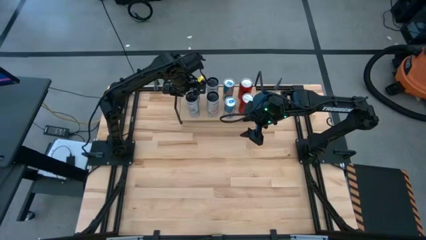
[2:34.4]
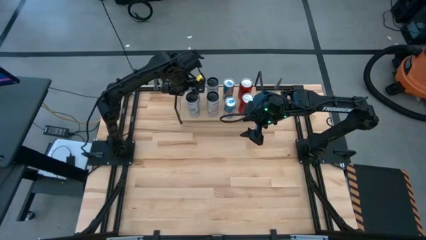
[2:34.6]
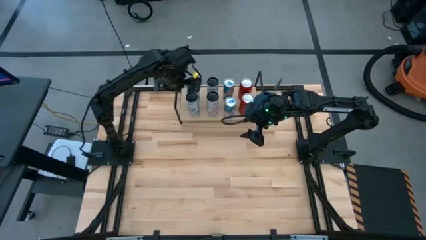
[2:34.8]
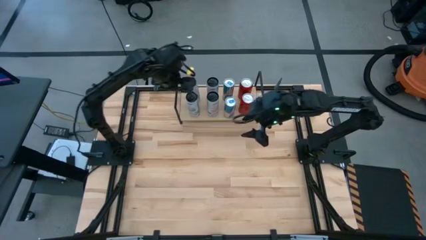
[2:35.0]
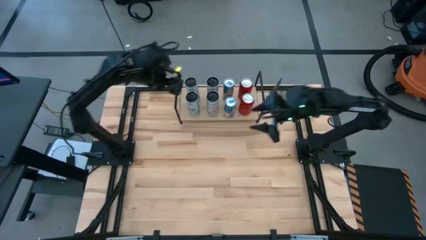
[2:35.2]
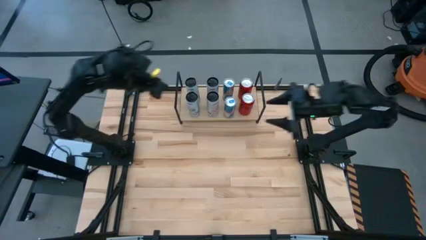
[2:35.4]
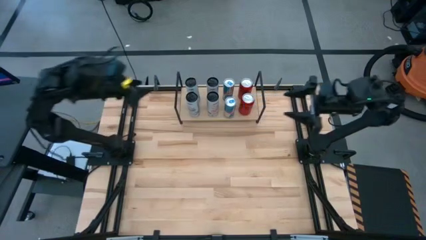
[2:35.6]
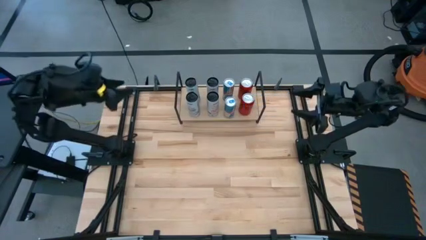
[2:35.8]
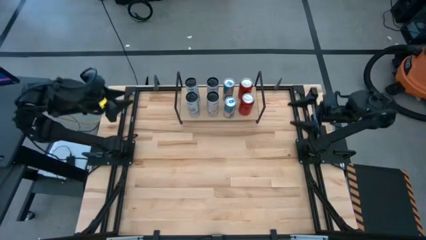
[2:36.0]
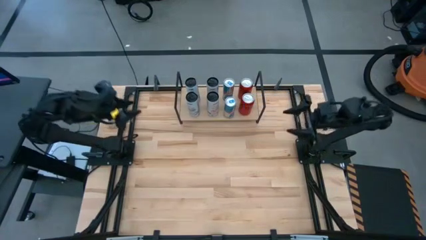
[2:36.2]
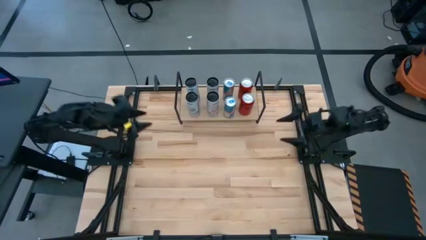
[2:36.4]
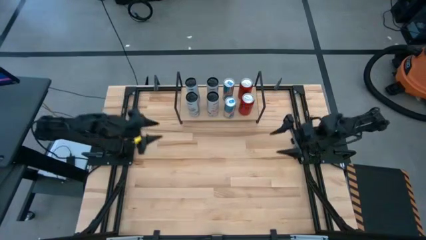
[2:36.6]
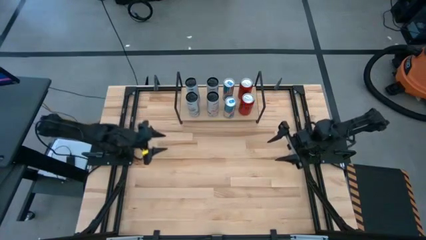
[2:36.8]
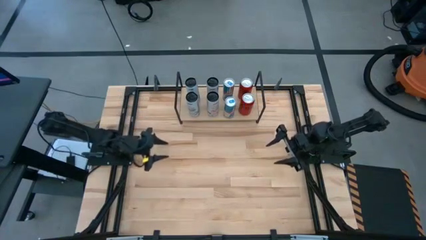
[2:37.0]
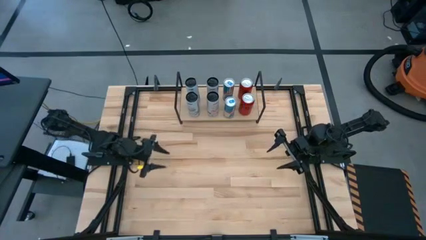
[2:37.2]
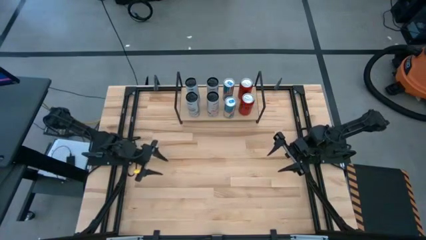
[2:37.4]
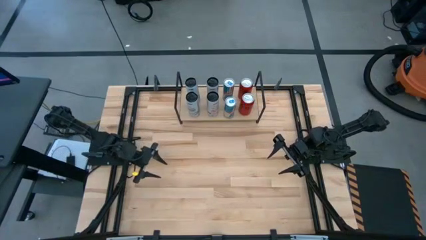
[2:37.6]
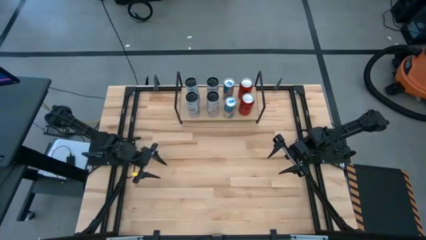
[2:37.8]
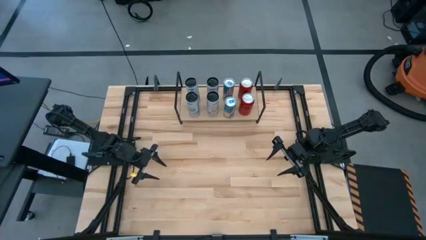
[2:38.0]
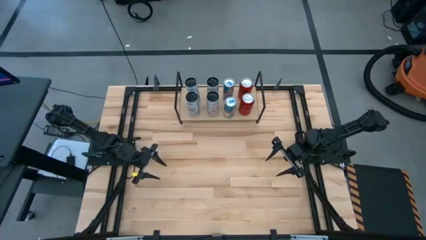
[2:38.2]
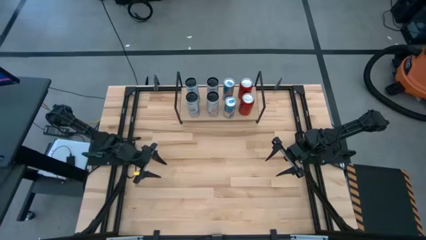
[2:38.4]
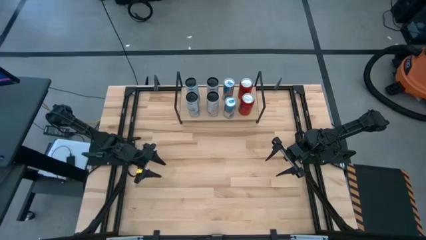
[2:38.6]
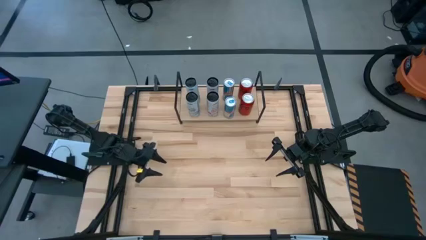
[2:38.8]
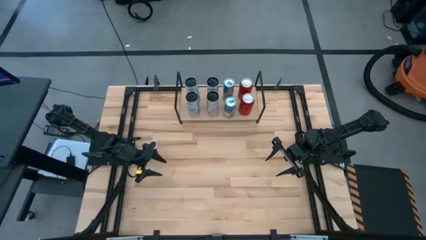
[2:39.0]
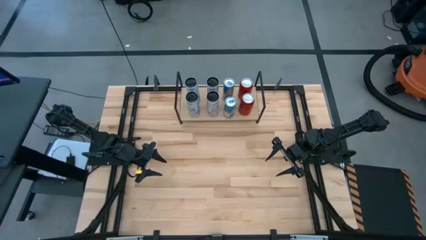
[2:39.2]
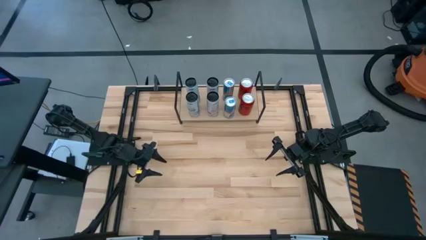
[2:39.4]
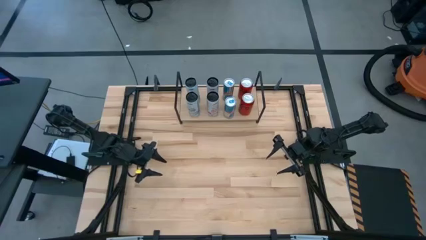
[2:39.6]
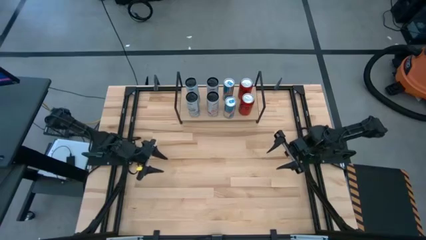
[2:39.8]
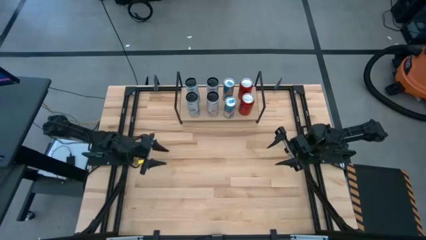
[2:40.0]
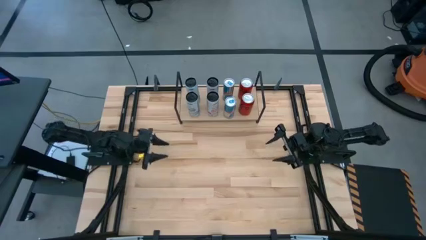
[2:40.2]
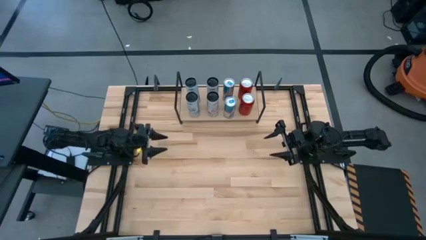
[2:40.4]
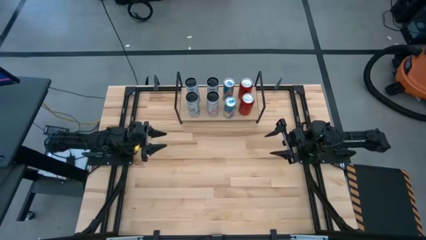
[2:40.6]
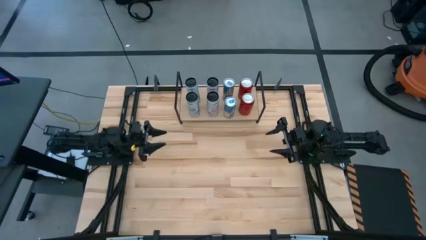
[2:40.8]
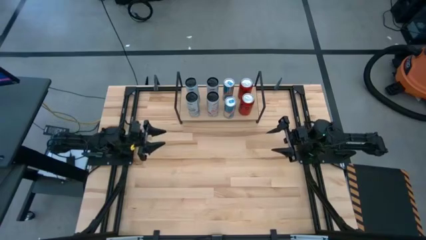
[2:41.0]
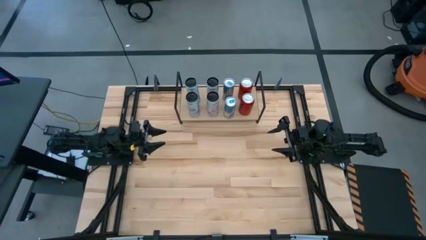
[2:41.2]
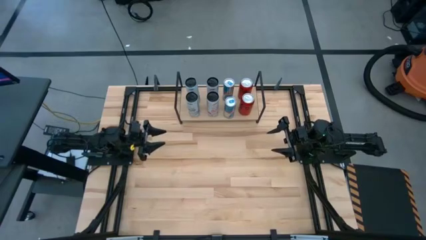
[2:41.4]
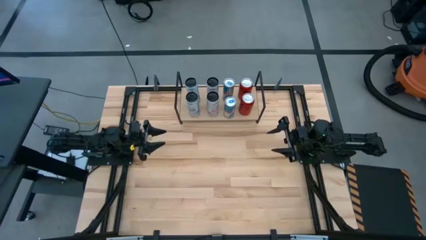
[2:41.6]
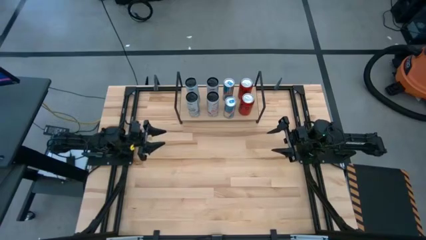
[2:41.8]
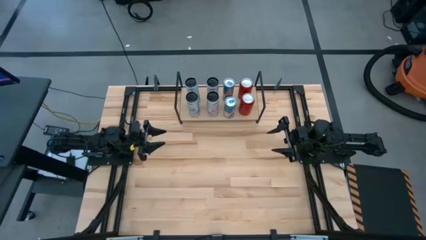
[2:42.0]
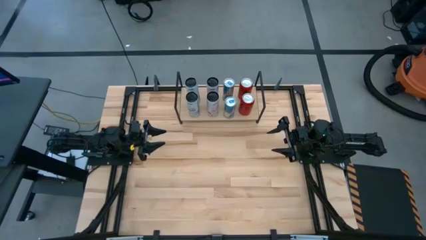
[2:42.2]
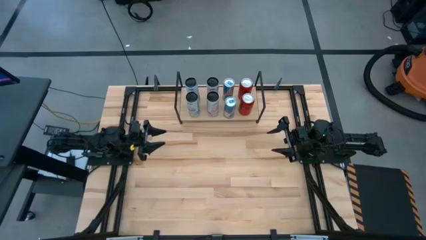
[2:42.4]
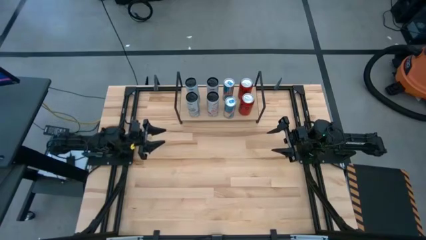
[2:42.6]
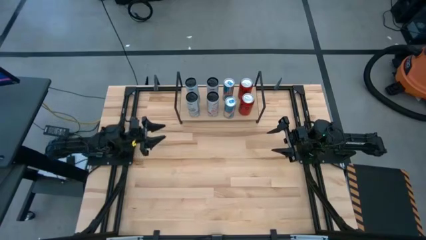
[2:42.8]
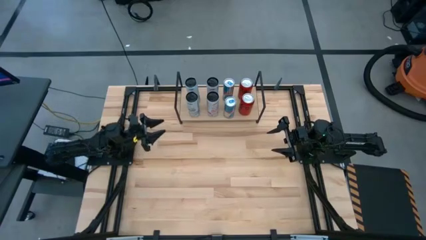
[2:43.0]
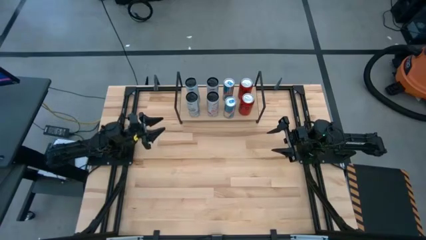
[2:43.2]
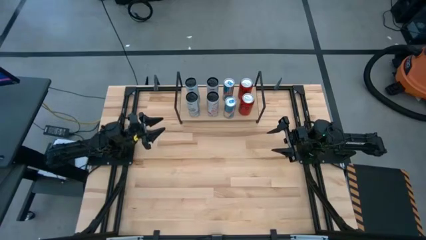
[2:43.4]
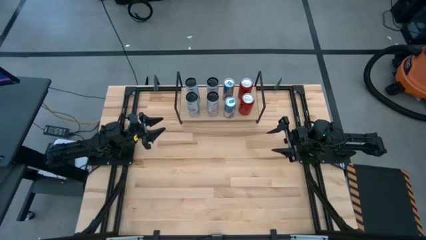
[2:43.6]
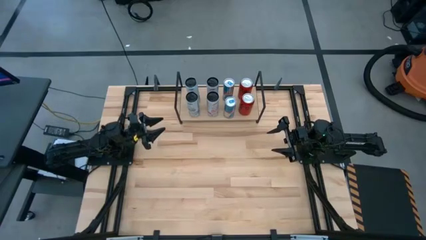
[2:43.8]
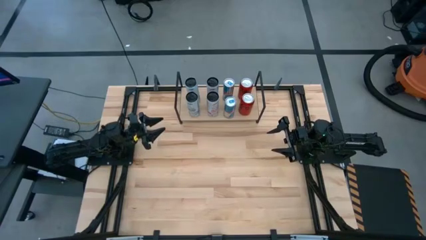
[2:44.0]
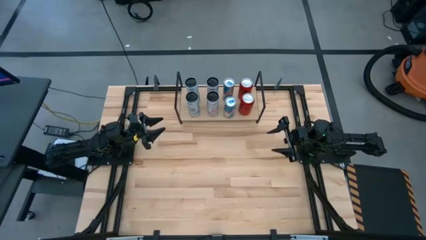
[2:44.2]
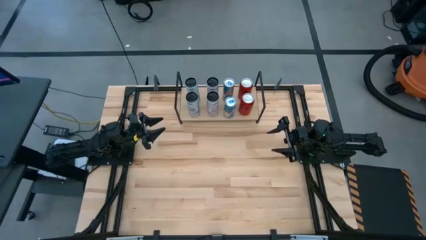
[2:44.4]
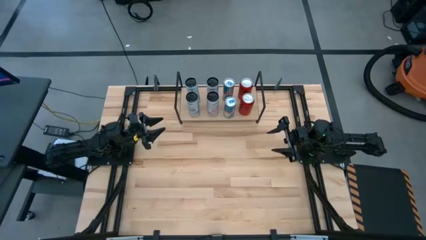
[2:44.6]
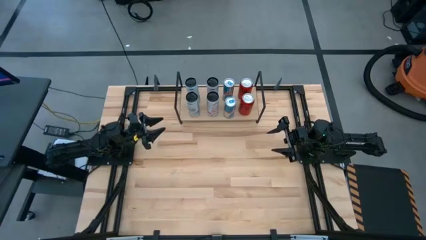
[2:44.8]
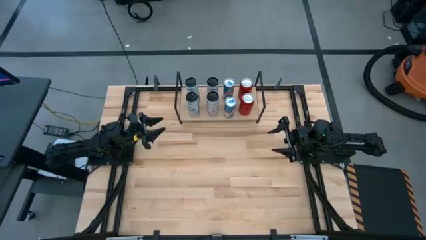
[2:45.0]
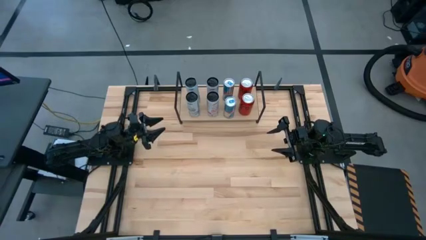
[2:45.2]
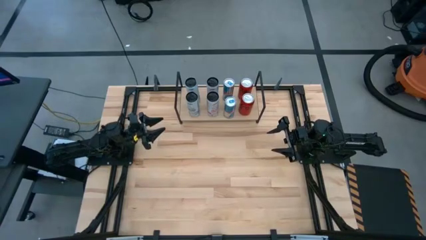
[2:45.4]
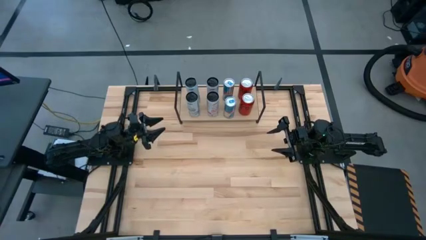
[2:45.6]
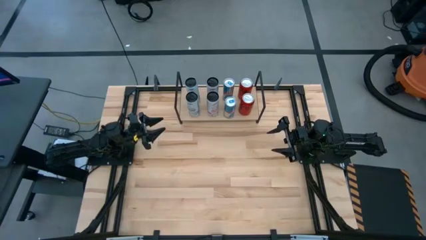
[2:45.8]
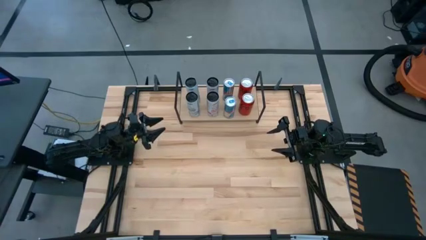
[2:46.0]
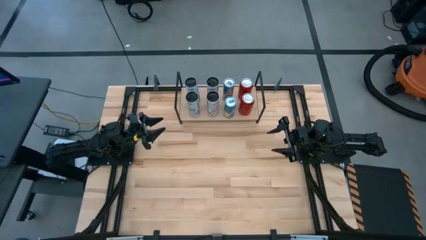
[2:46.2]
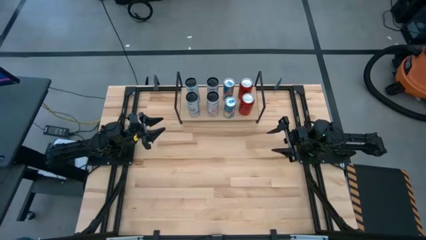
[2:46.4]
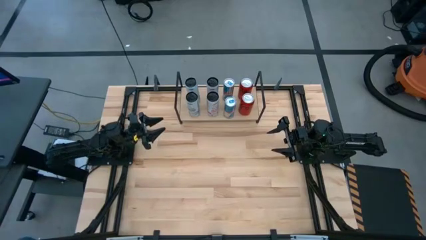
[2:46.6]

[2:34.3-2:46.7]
Task: Place canned beverage on shelf
Return to Home Position

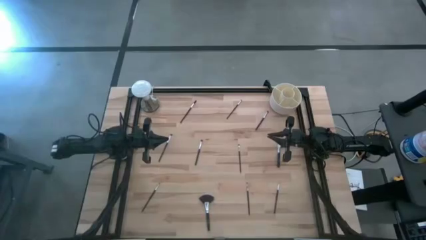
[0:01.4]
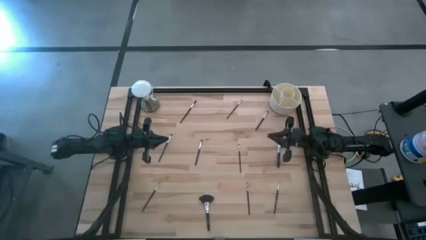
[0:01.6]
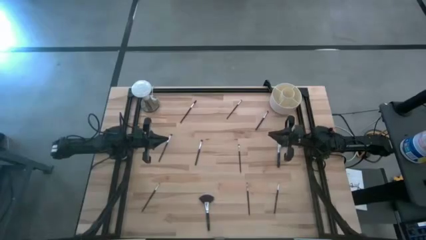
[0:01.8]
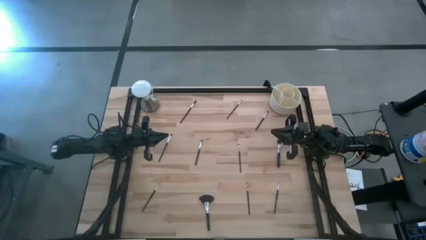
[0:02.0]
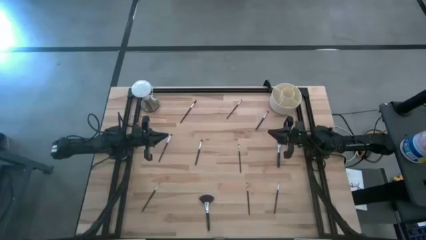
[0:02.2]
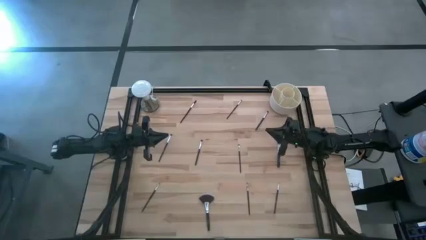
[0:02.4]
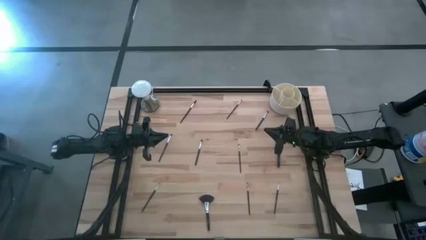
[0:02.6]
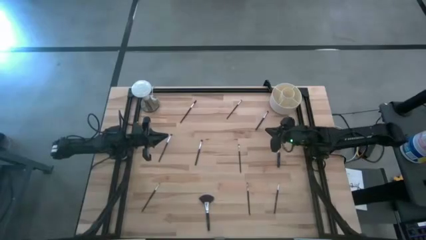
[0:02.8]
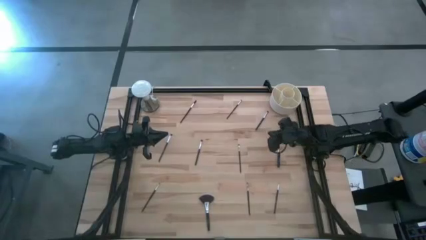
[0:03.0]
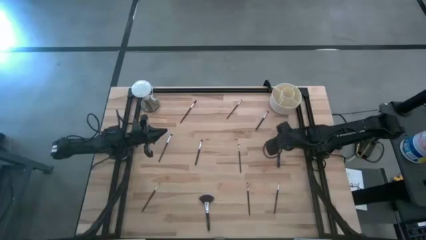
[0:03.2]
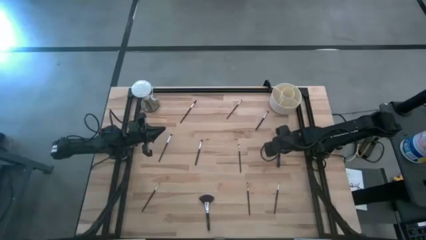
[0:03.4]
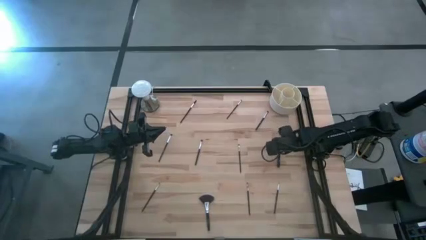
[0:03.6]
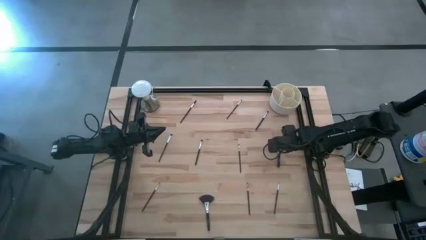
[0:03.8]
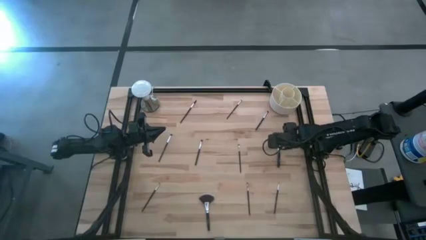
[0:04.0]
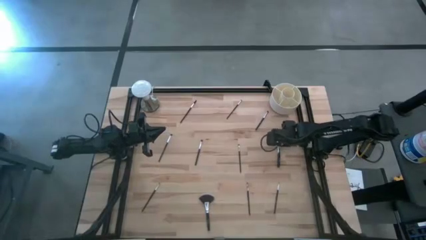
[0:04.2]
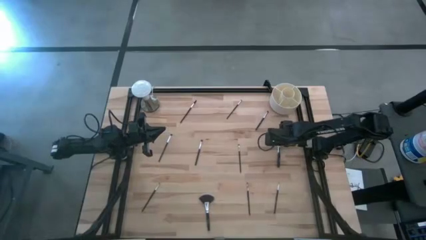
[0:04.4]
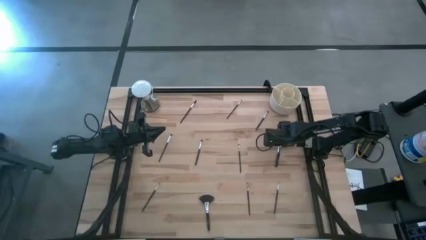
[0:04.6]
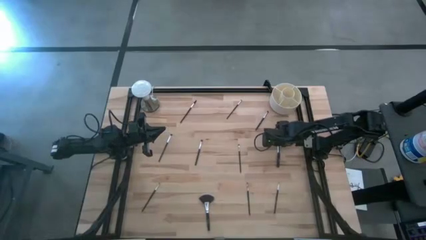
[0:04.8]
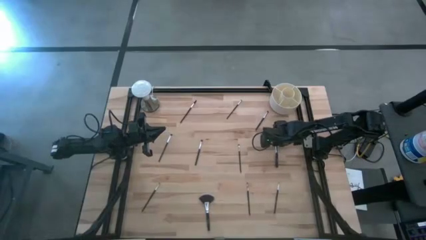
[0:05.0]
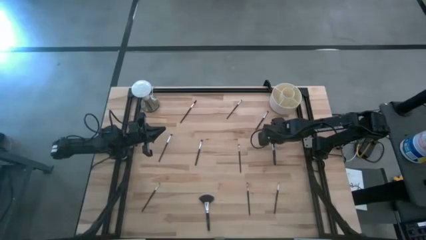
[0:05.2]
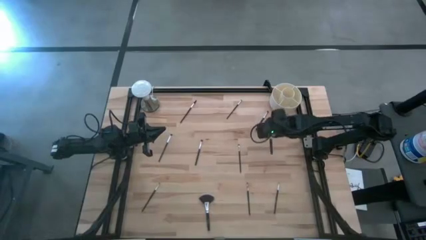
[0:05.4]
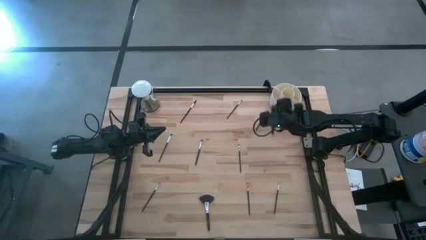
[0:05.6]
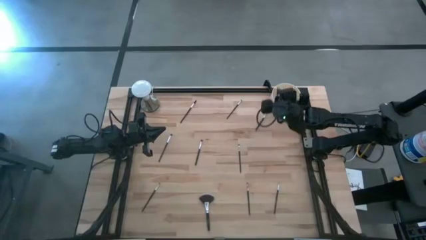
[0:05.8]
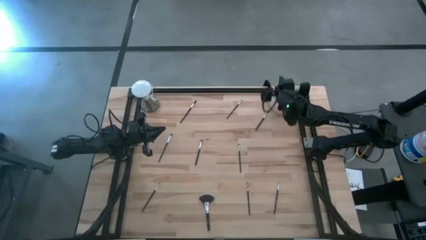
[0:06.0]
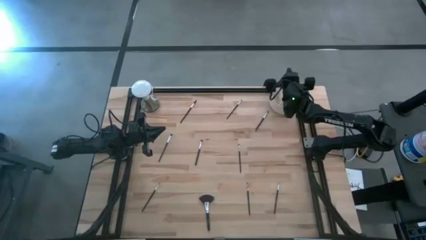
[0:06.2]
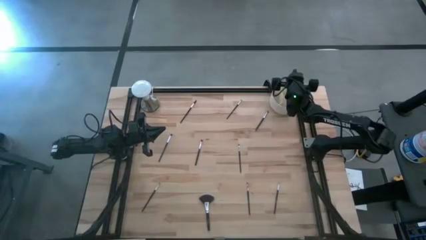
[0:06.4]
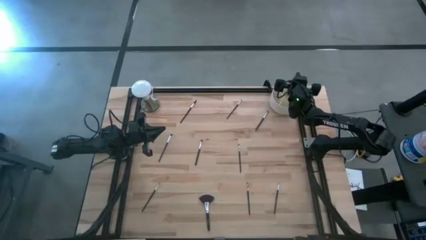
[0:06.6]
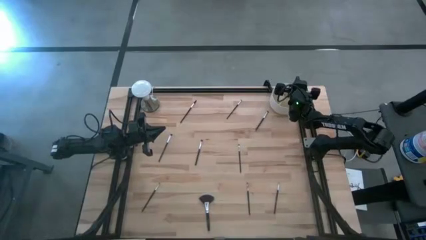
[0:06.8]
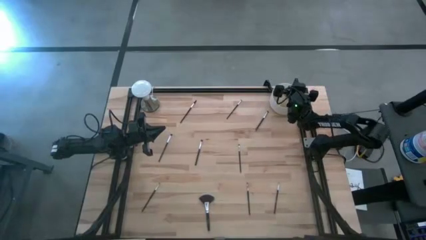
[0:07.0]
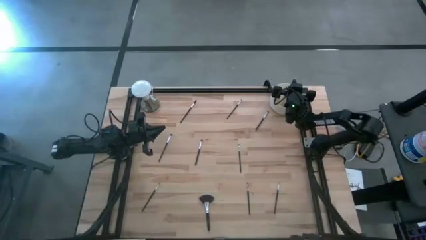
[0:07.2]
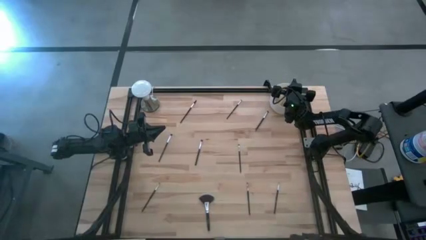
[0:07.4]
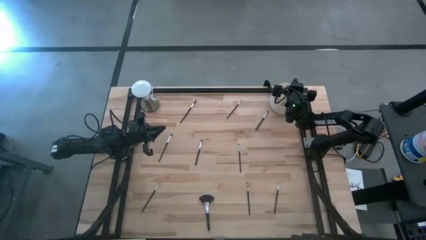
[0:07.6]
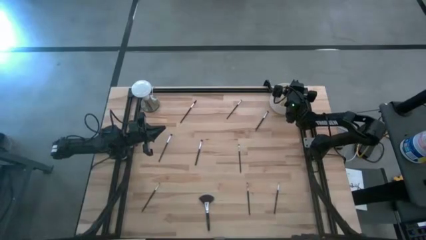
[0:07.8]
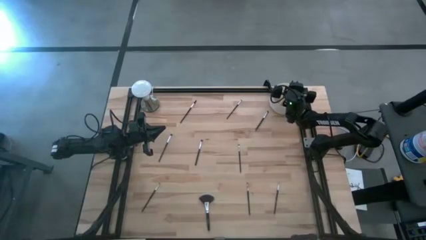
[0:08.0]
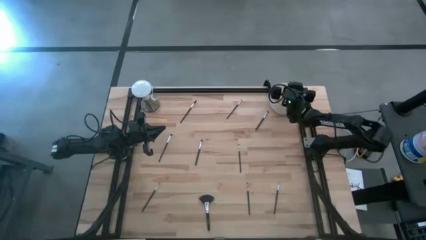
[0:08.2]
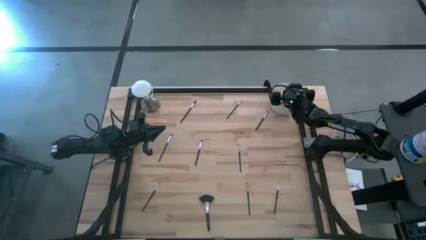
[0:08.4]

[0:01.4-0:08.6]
Task: Pick & Place Makeup Brushes
Put the black blush brush into the white makeup holder
